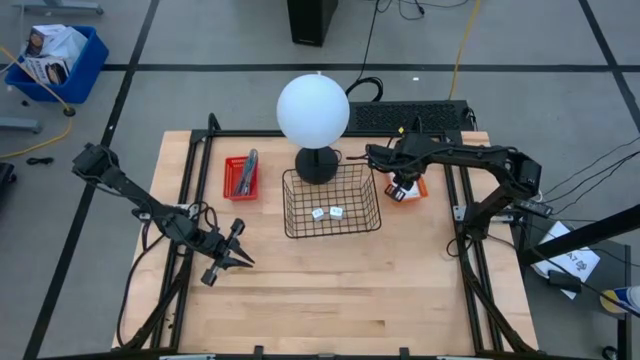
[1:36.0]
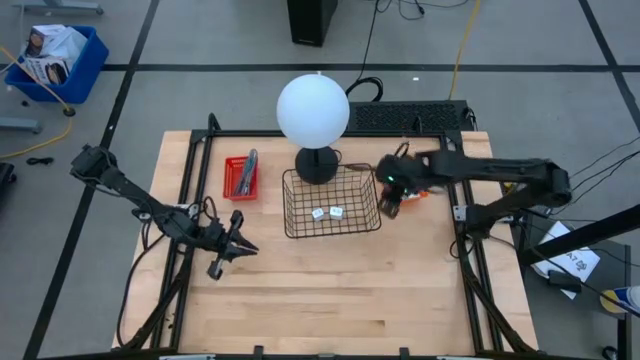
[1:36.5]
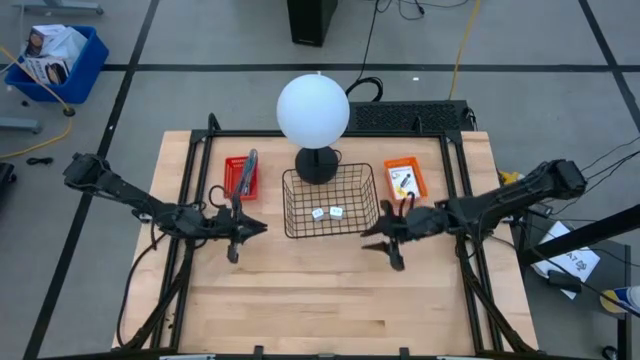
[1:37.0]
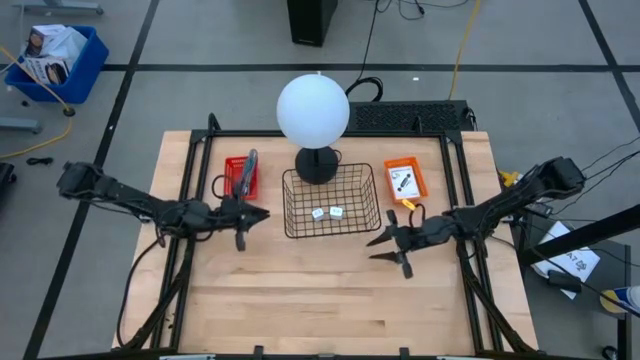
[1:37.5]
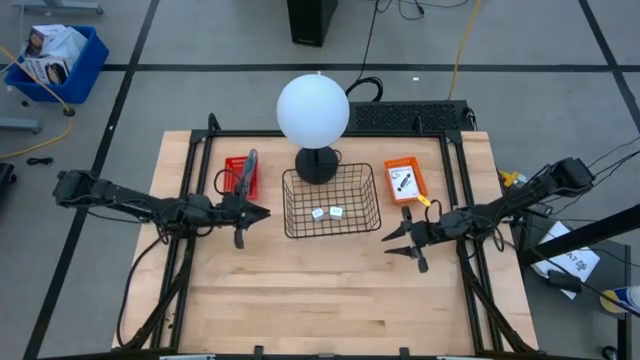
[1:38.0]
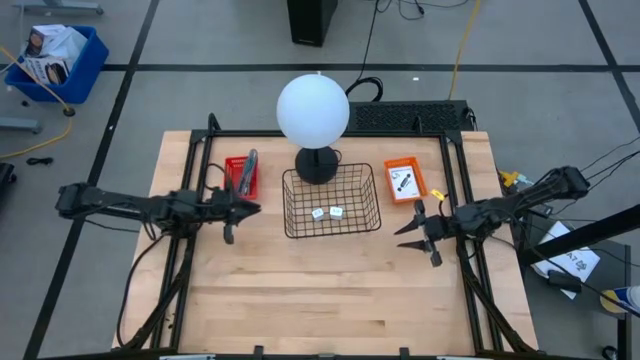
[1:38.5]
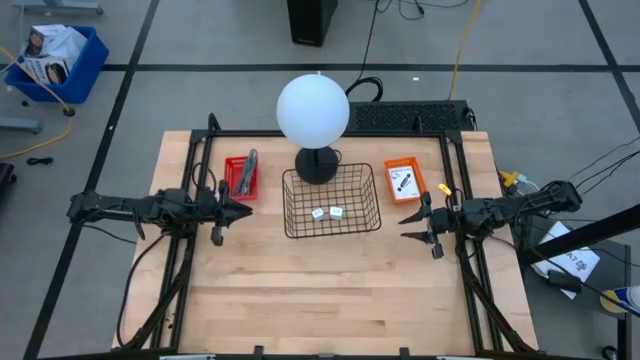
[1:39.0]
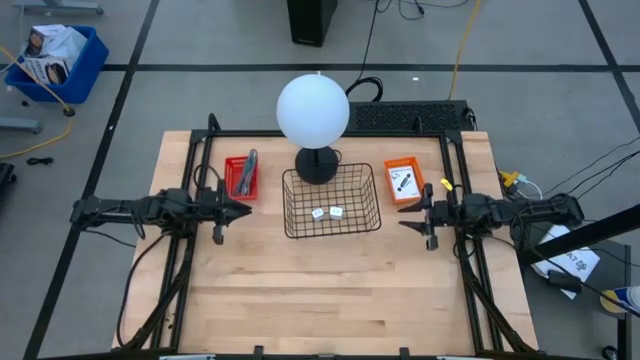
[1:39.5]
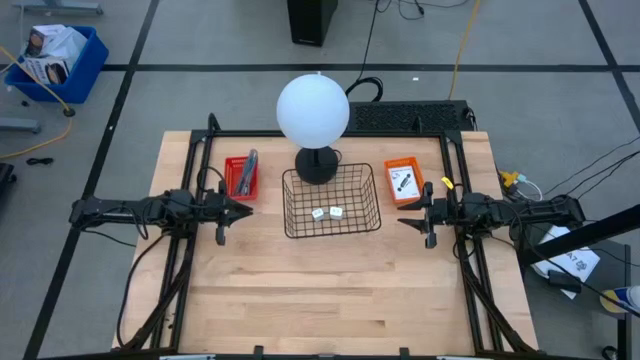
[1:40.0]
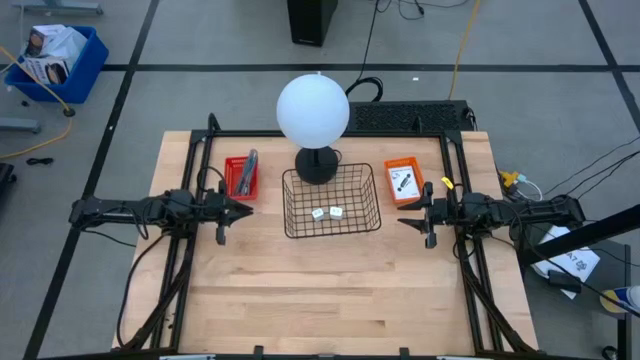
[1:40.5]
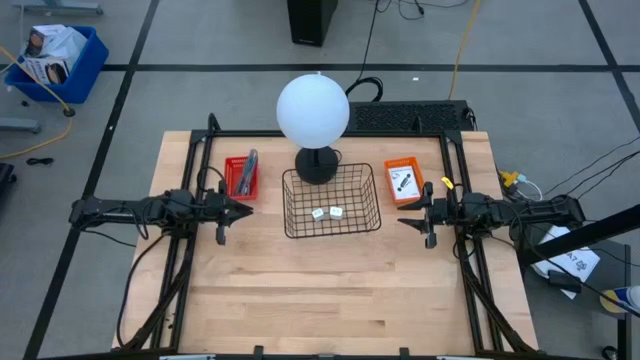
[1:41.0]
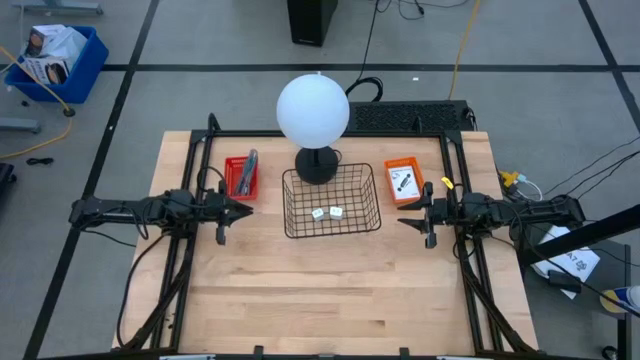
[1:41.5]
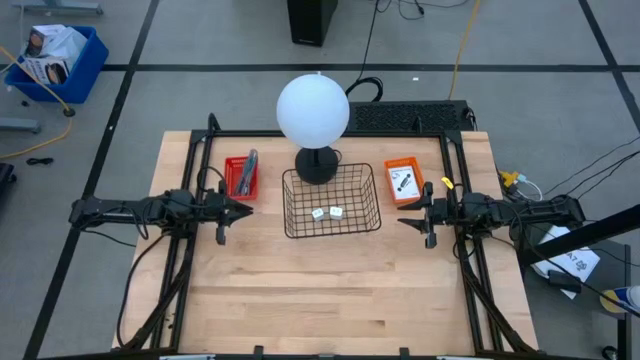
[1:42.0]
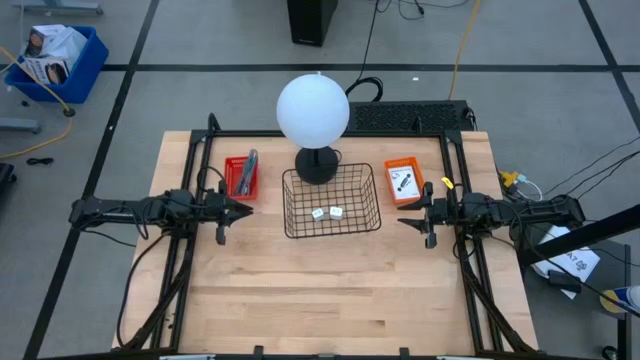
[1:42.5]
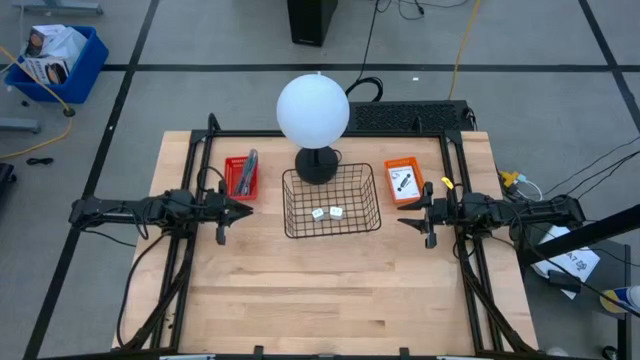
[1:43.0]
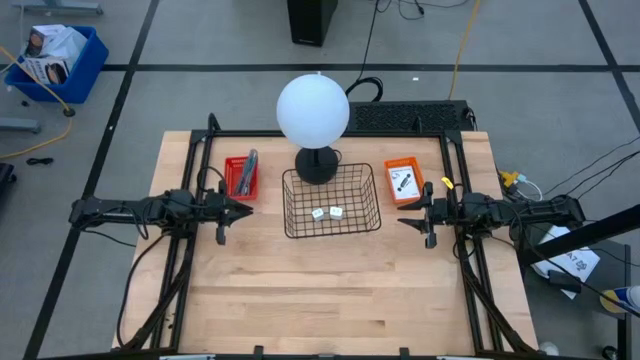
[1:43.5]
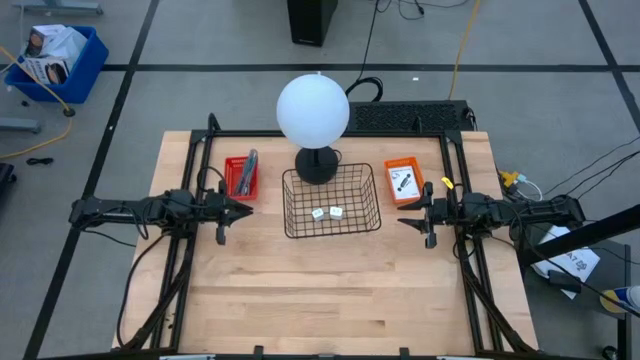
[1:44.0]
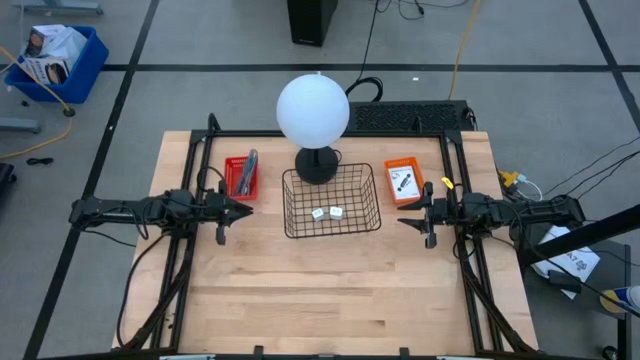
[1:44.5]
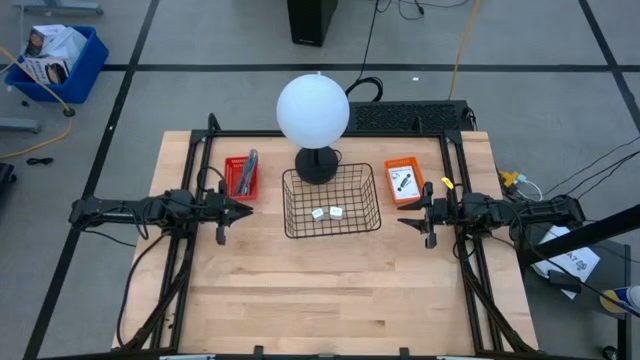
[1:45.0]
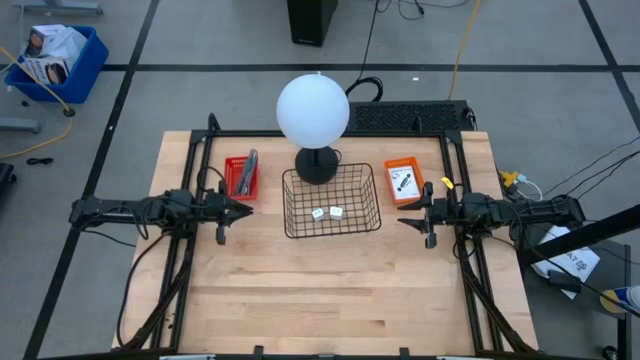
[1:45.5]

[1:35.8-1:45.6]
Task: Pick and place items into bin
Return to Home Position

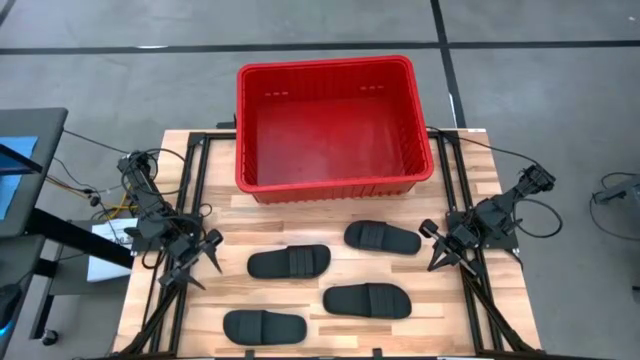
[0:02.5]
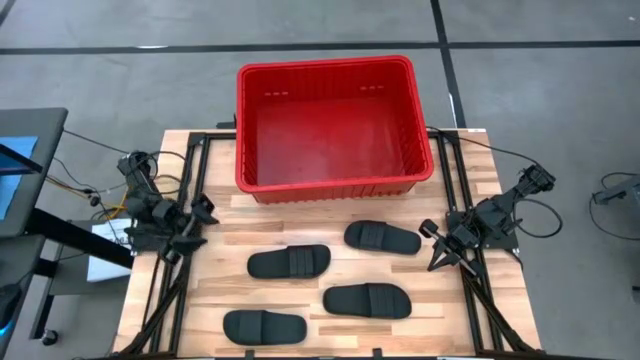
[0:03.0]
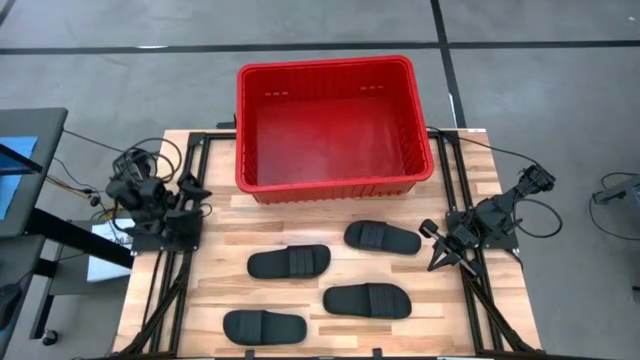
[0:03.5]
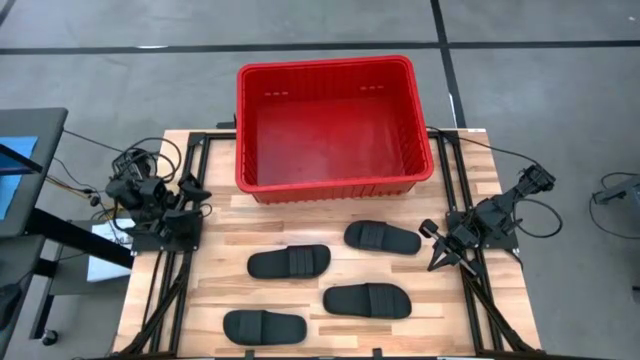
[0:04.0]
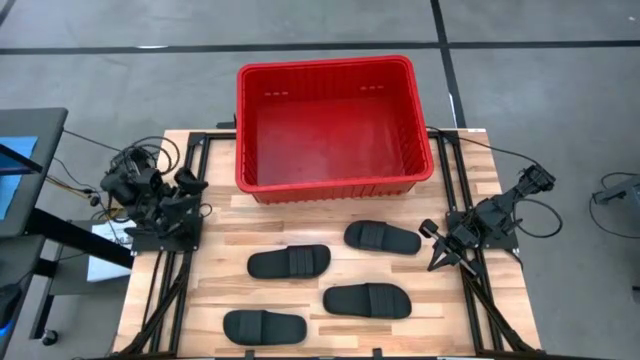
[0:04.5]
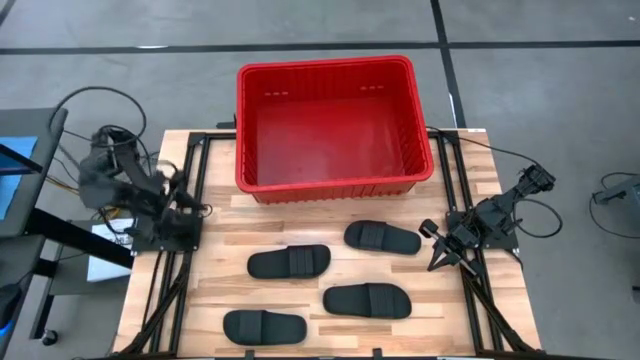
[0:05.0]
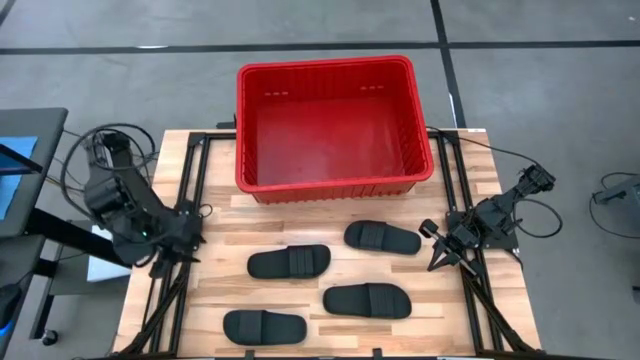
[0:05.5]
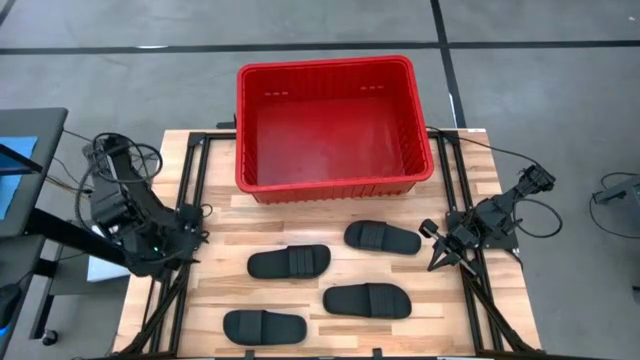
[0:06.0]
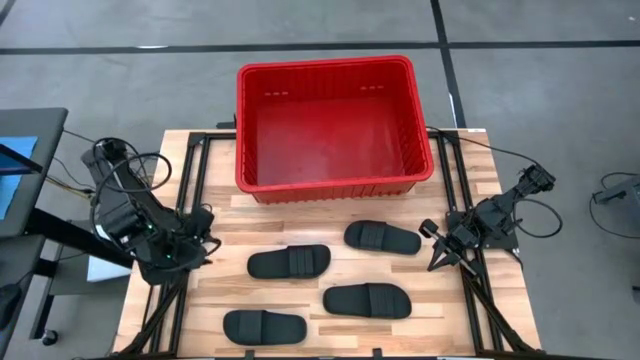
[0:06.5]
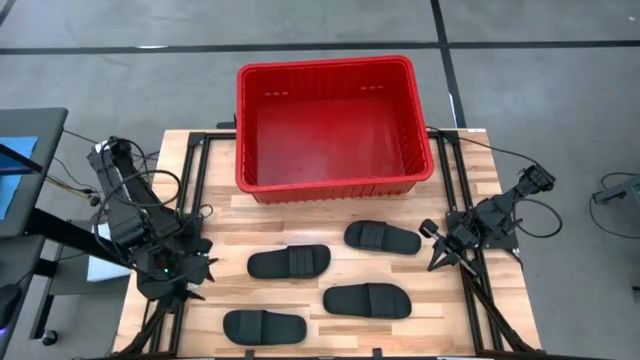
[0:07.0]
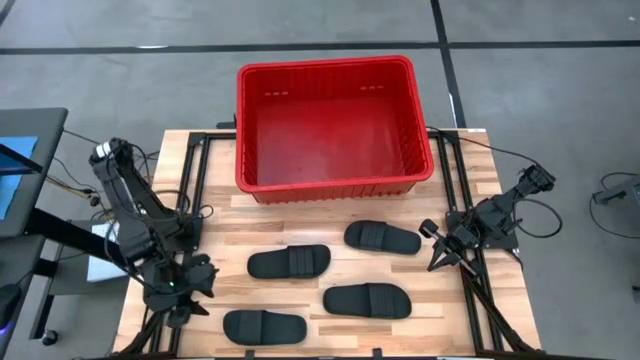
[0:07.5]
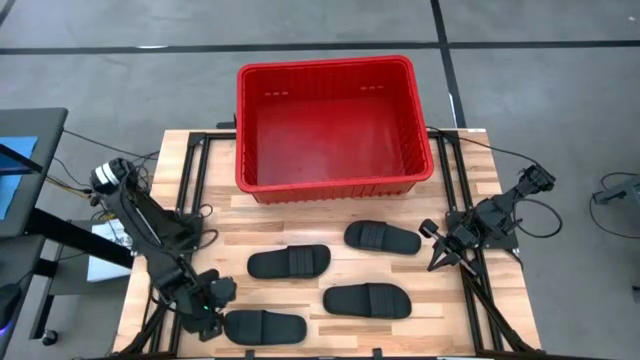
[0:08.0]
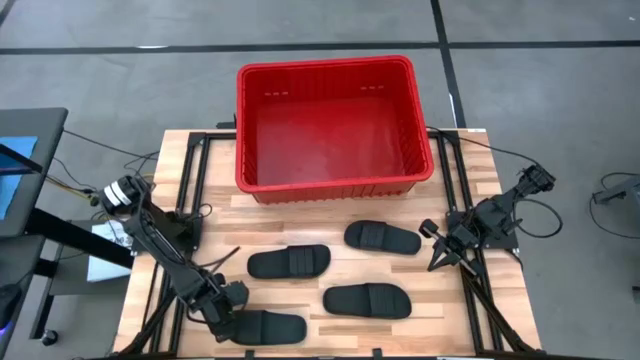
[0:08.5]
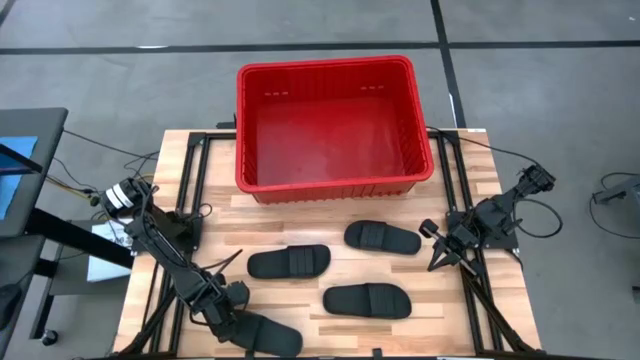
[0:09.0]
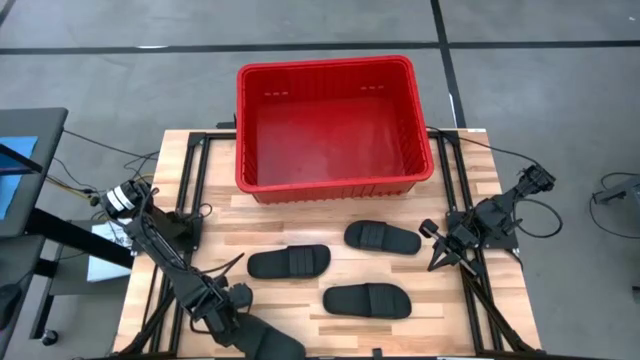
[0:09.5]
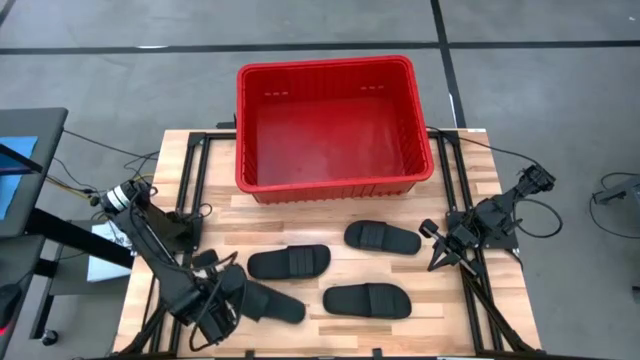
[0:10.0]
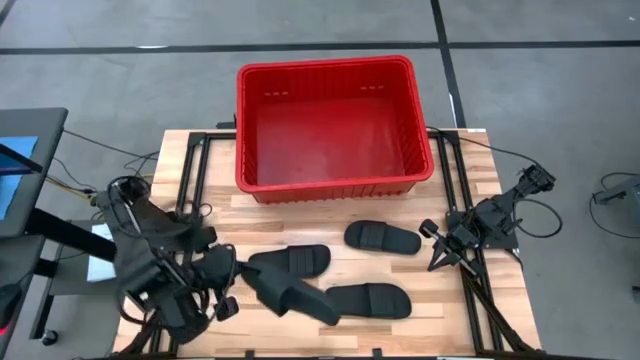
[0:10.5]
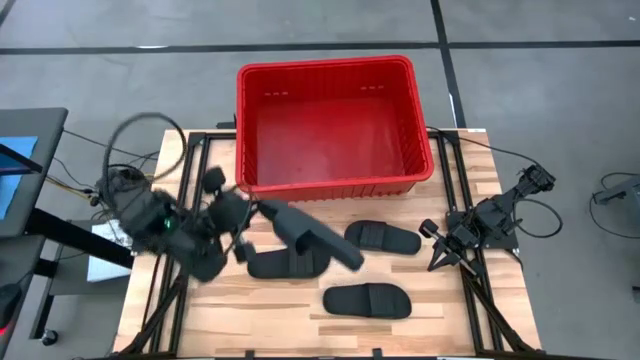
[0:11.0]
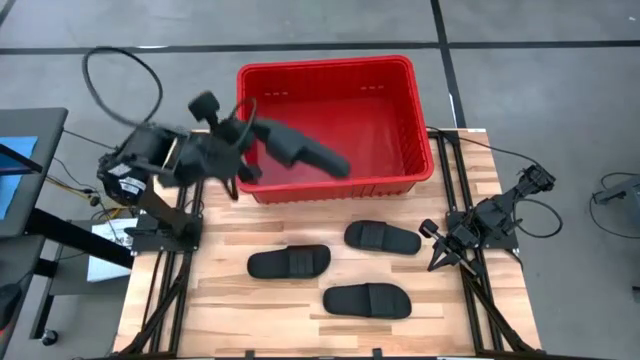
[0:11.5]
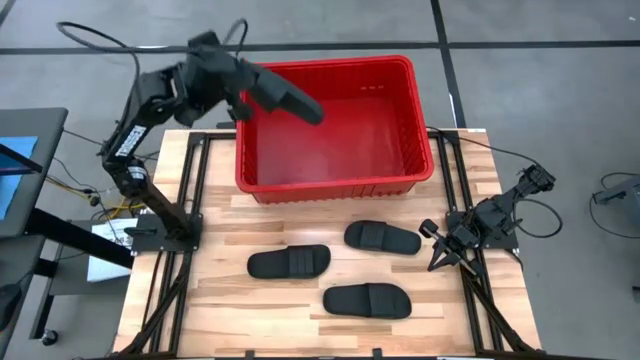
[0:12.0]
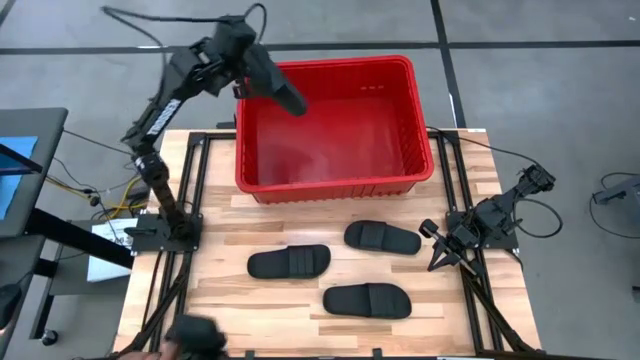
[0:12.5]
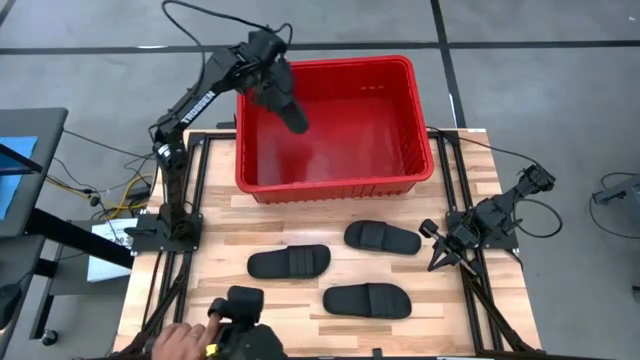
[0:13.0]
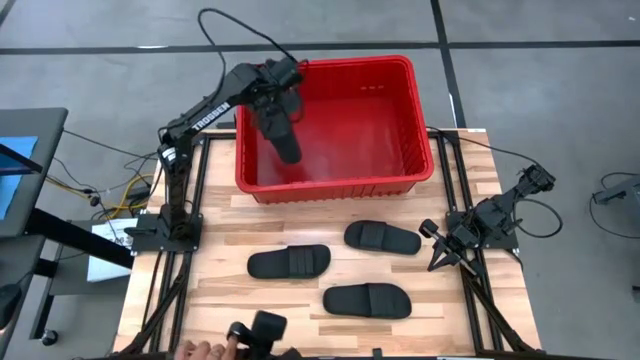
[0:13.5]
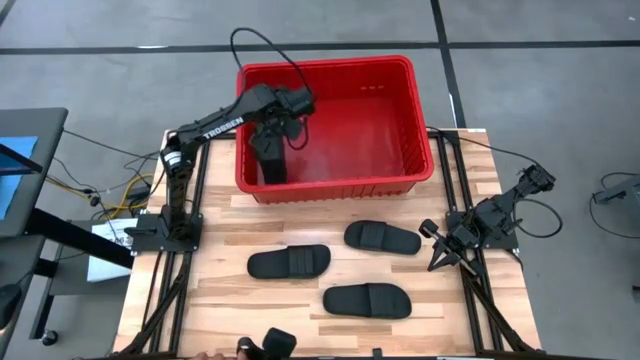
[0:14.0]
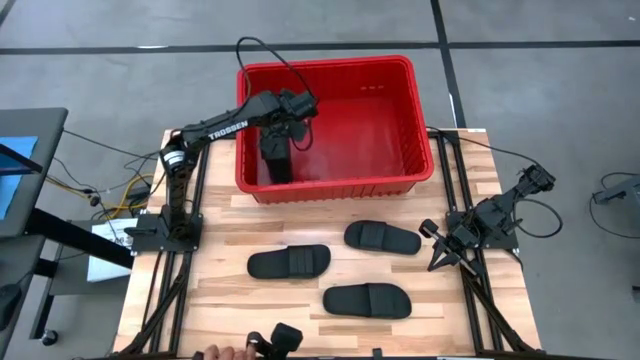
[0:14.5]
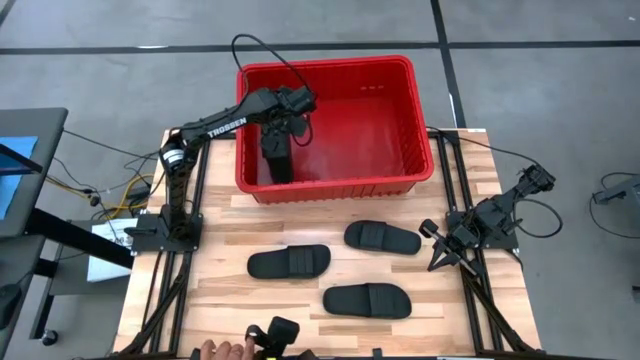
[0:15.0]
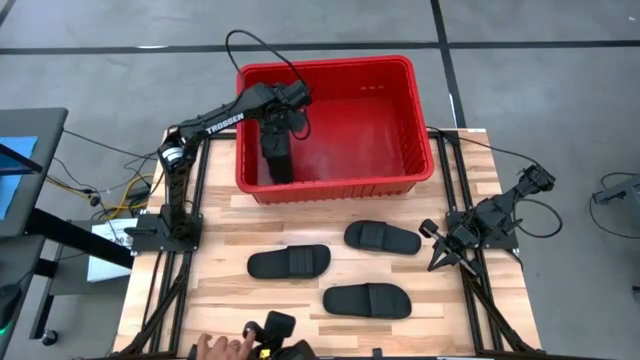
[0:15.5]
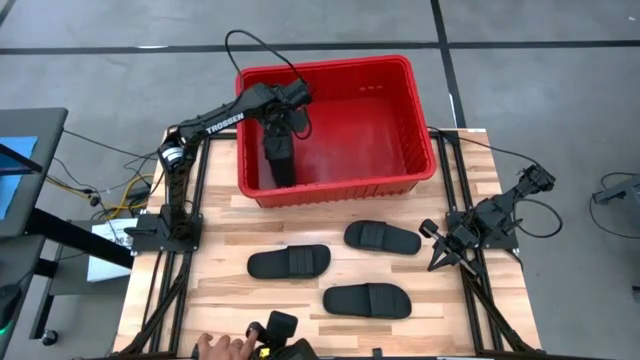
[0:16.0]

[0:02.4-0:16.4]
Task: Pick and place slides into bin
Put the bottom left black slide into the red bin
